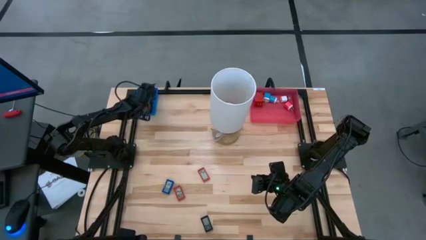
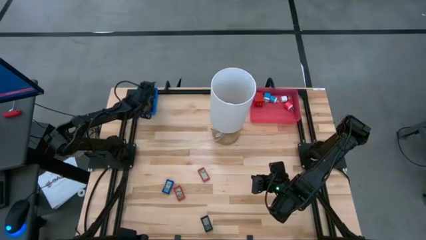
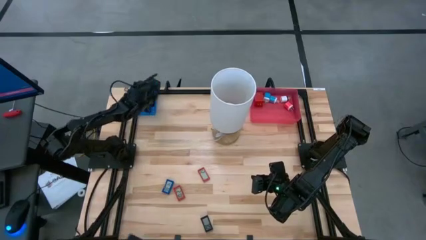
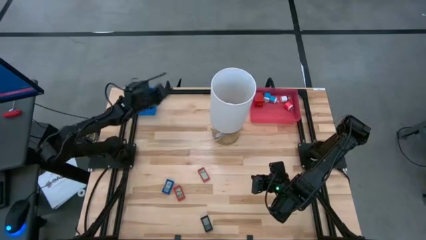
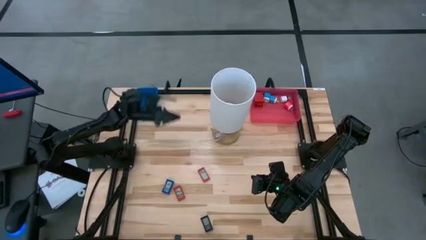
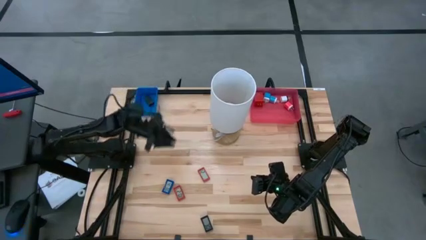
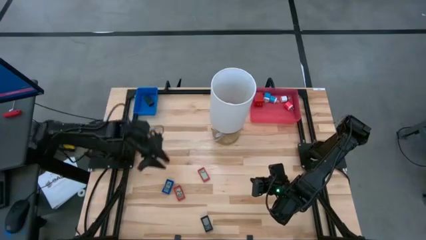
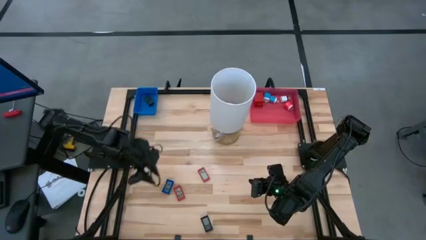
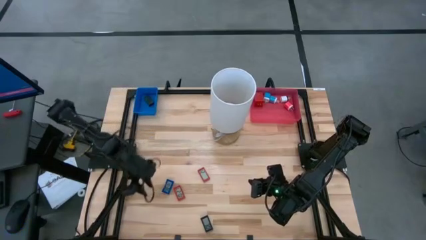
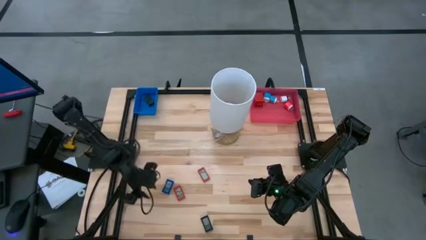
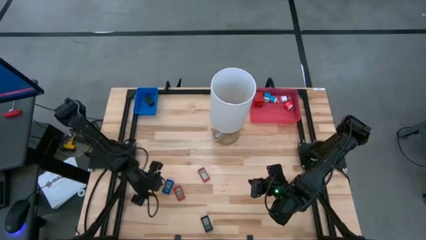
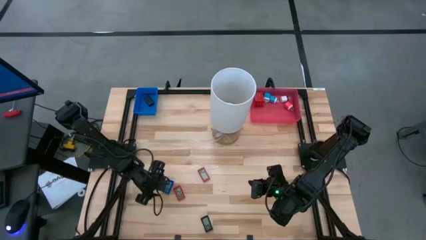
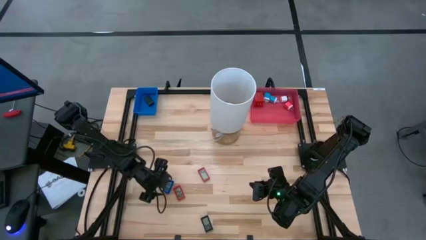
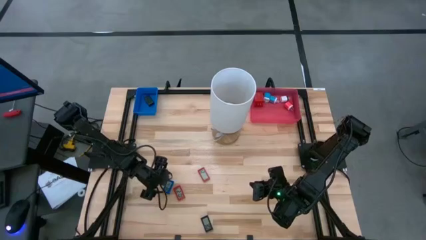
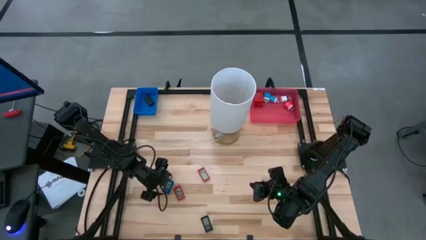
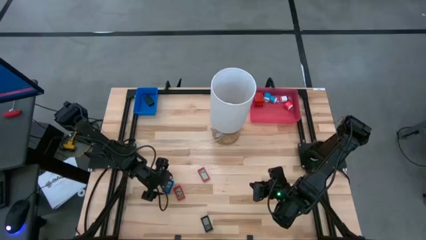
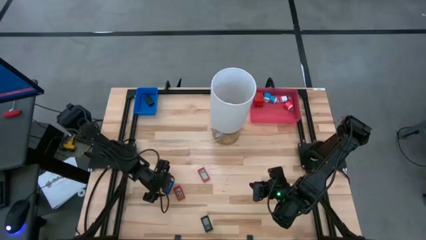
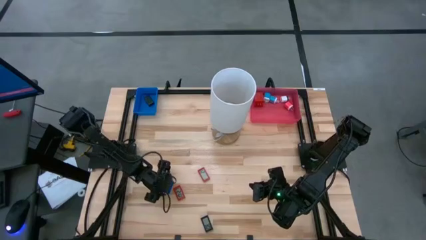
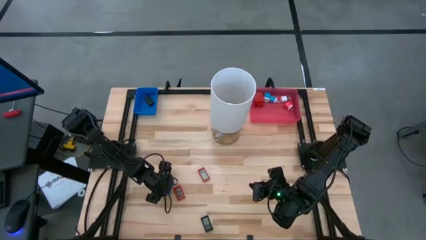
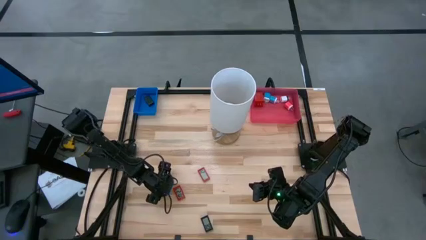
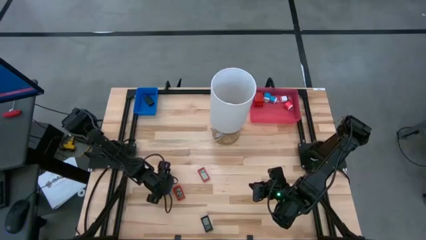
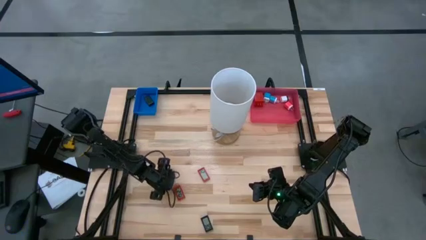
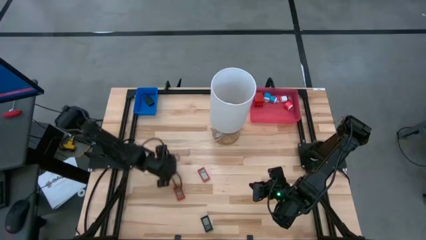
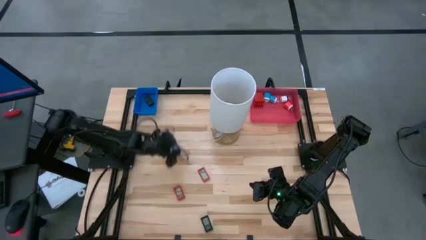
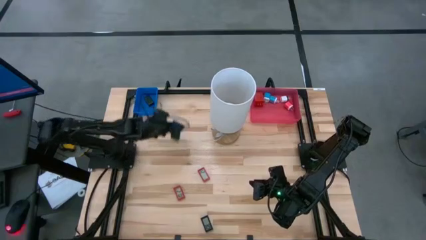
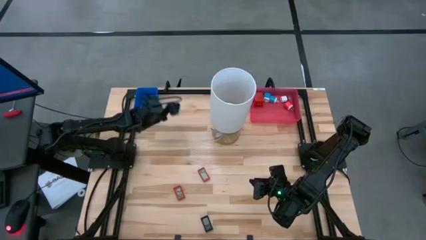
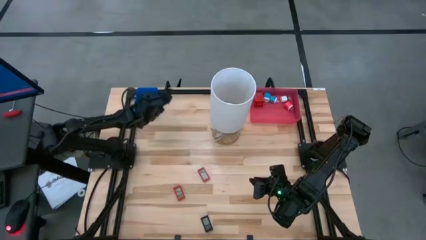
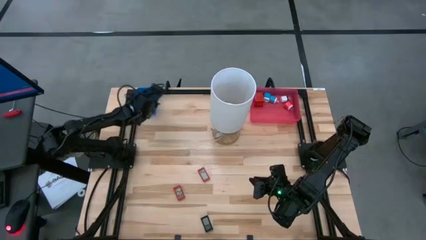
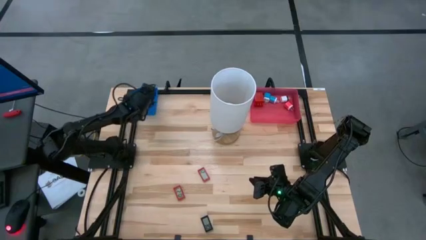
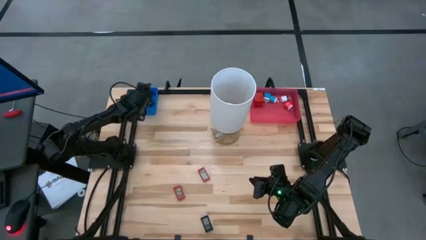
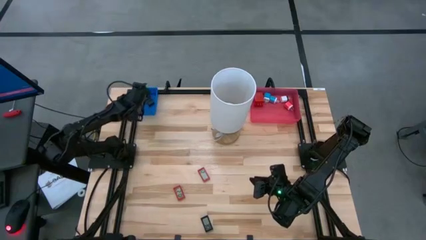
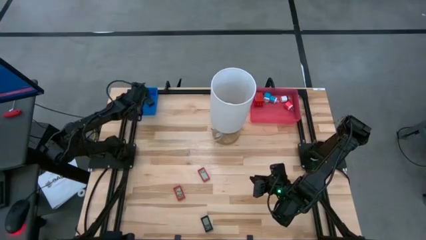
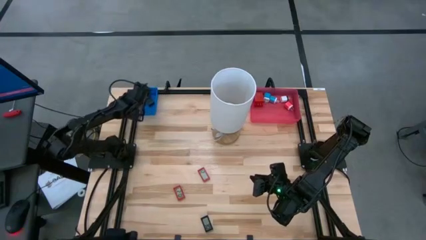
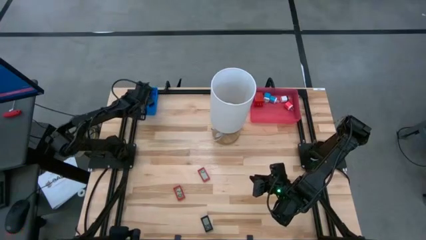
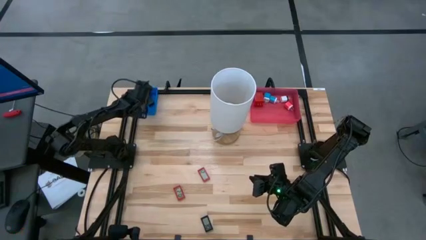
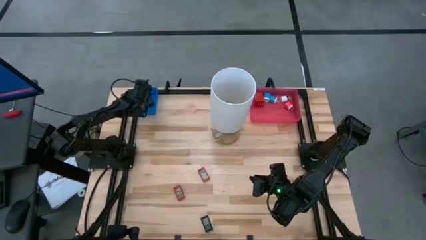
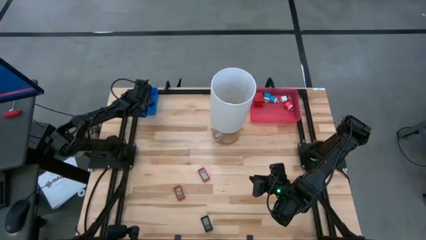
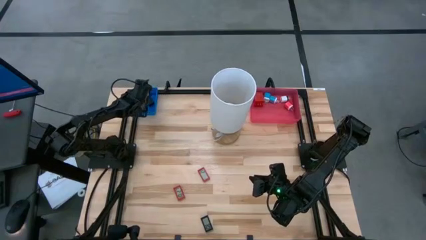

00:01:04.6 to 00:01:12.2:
Task: Pick & Place Office items
Put the blue digital timer into the blue bin

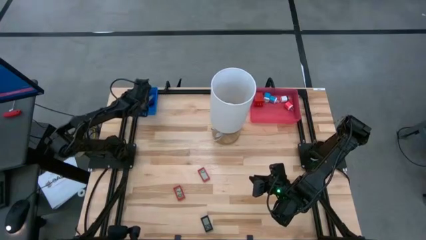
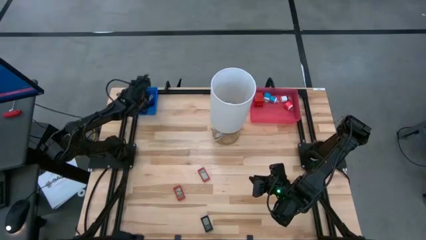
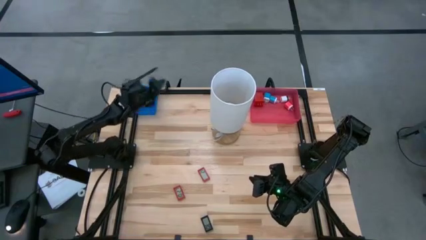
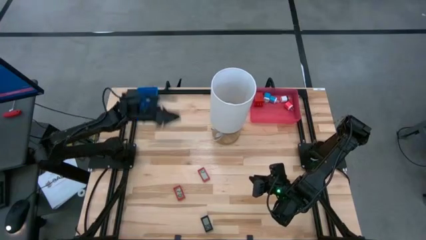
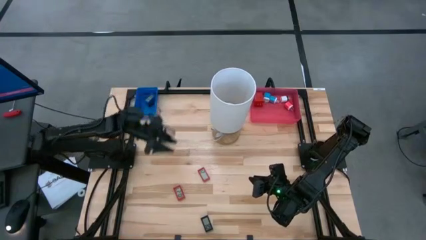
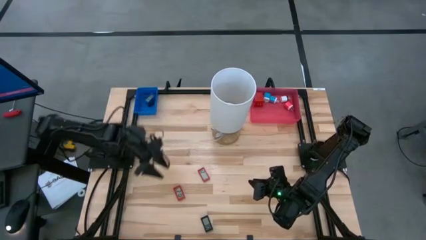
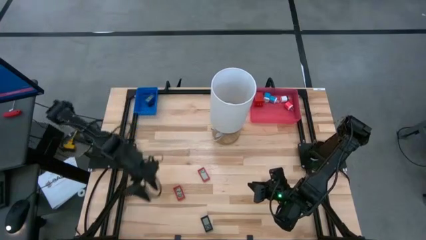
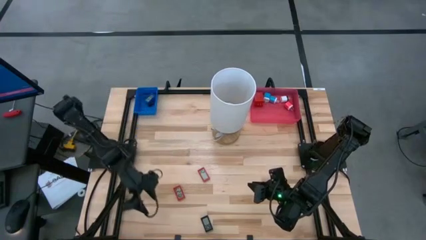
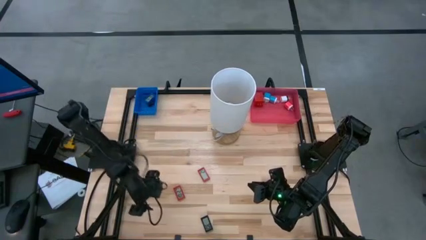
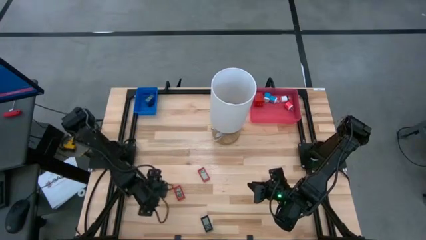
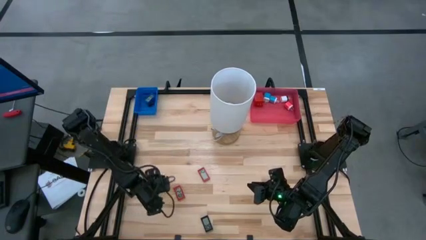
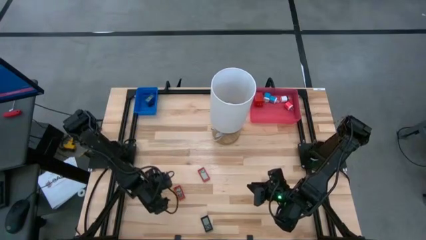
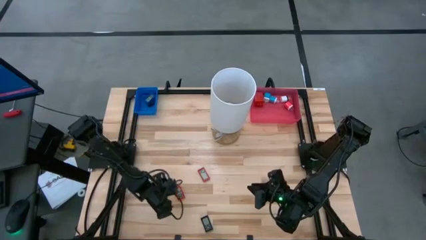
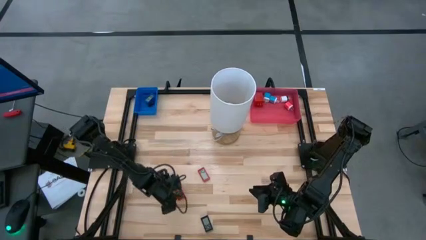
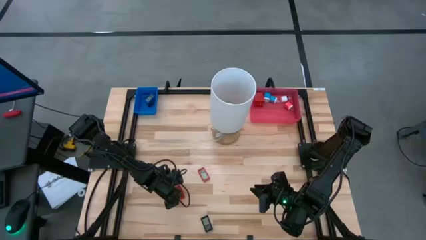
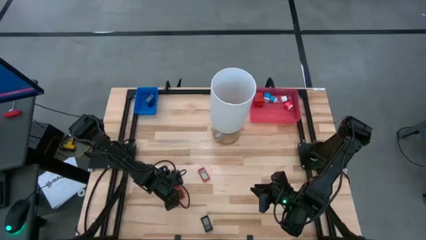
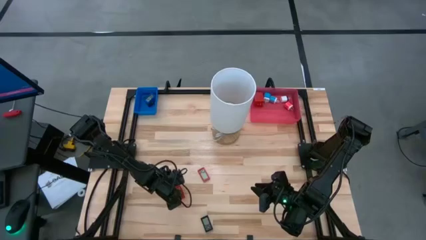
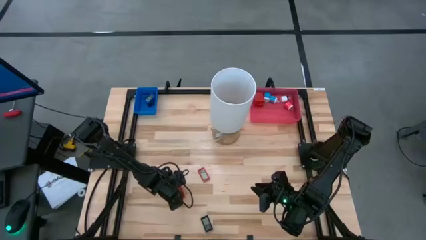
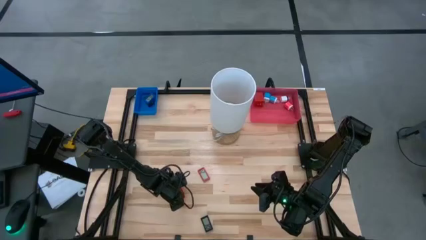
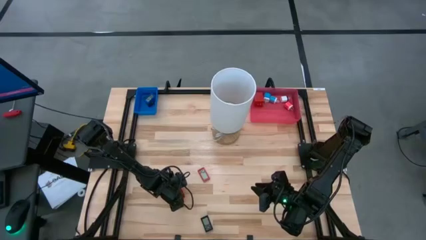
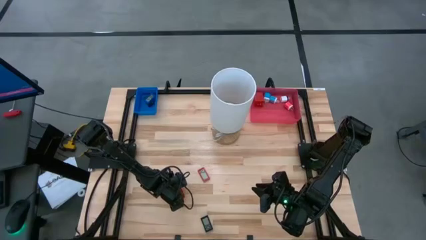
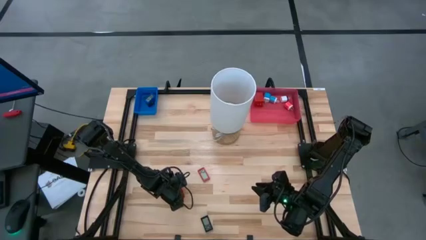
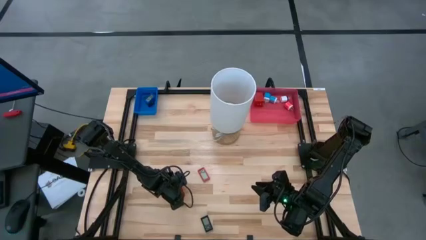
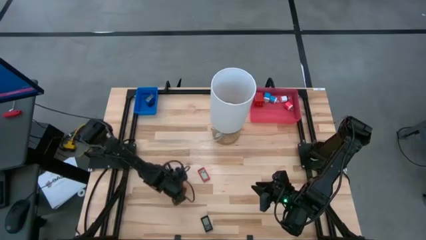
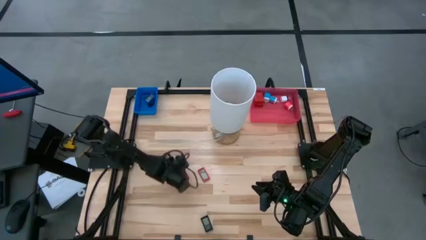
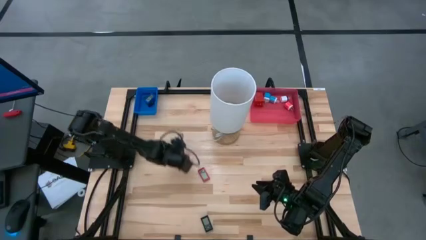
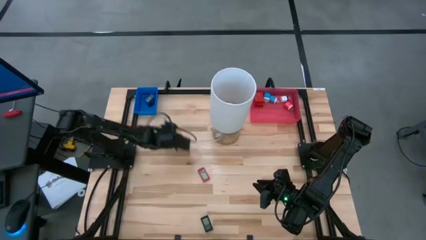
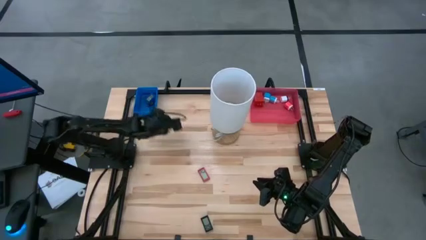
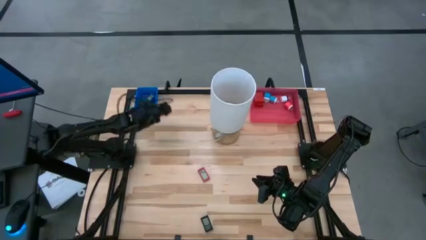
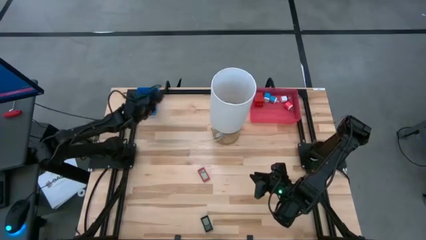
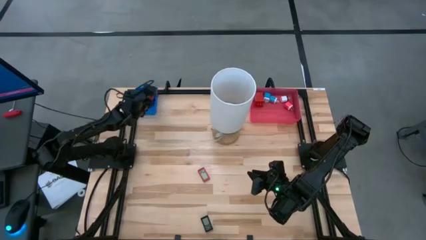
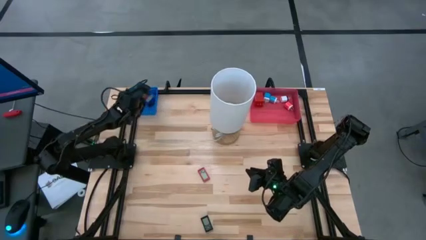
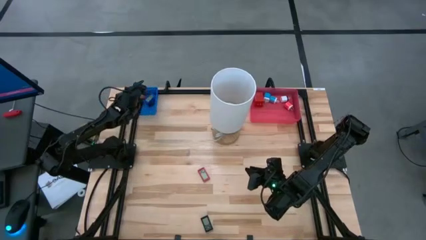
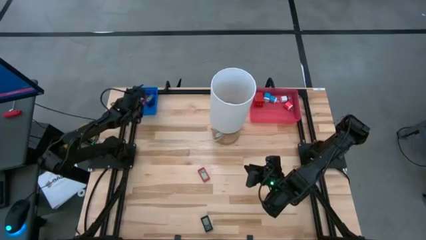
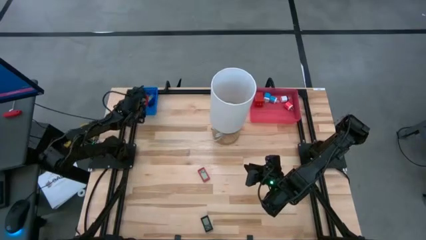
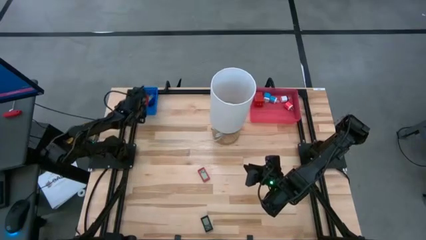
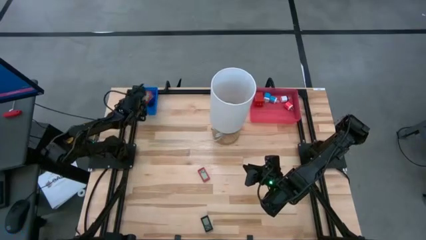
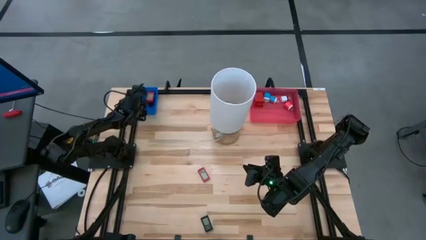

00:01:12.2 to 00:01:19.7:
Put the left red digital timer into the blue bin

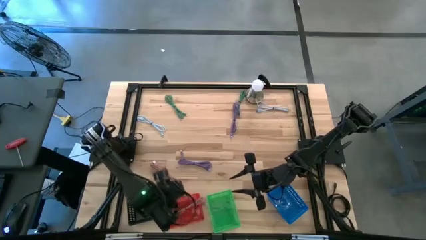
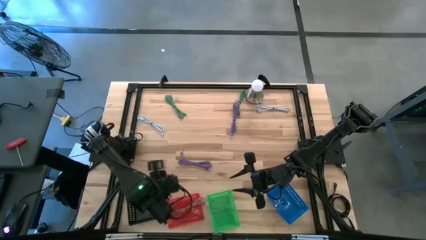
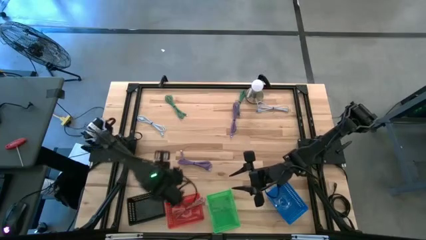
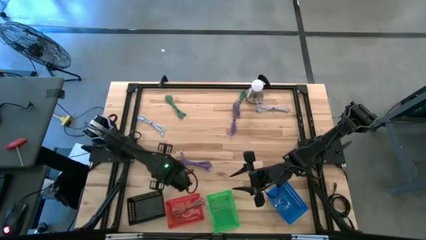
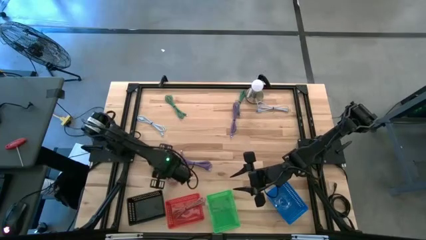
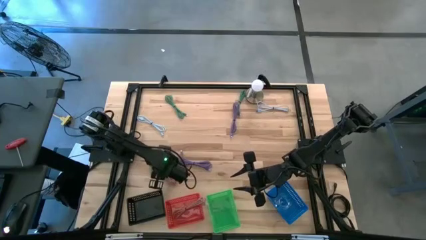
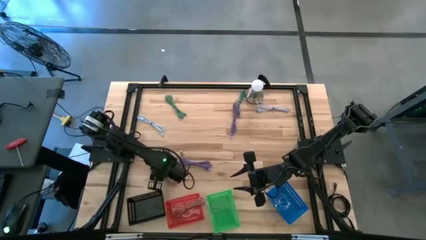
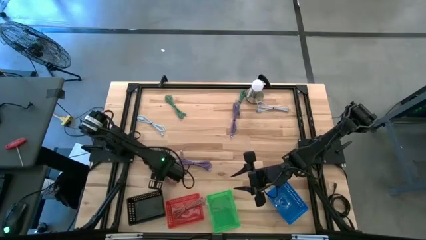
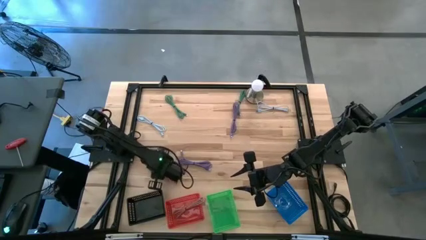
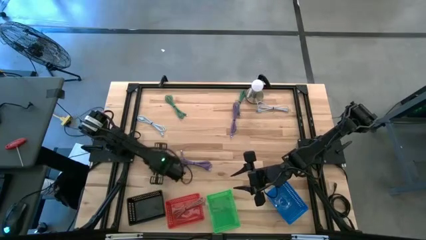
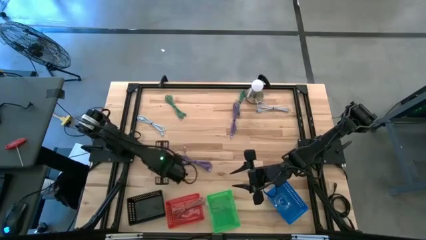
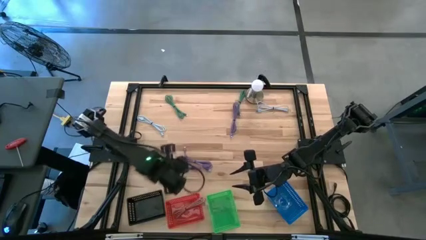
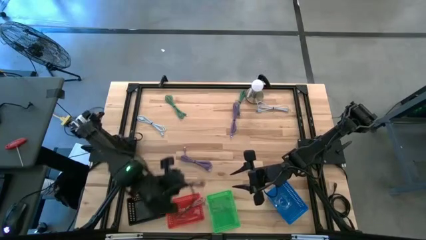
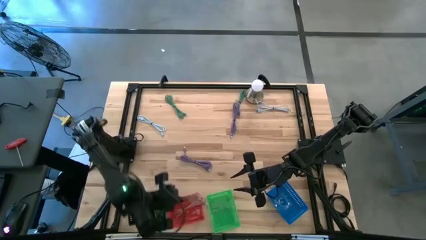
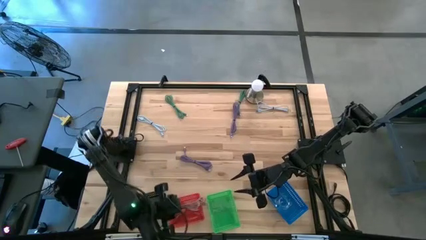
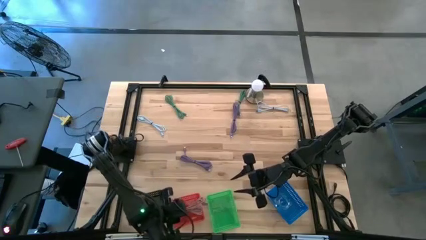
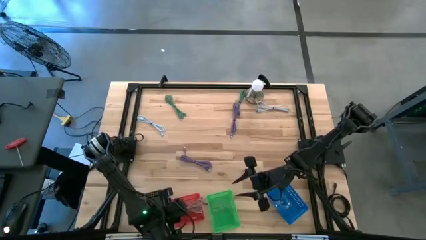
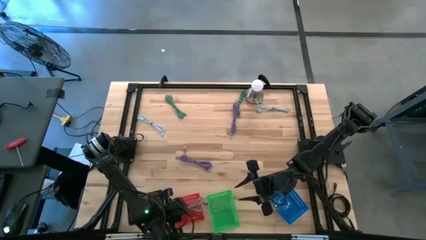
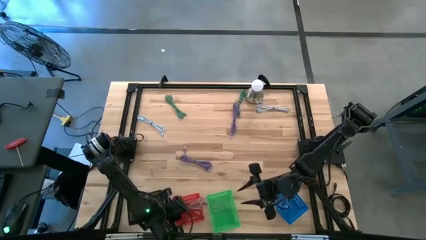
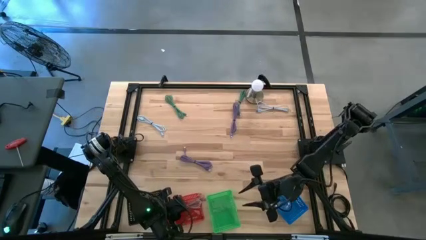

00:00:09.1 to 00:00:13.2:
Task: Pick & Place USB Port
Put the pink USB charger into the red bin
